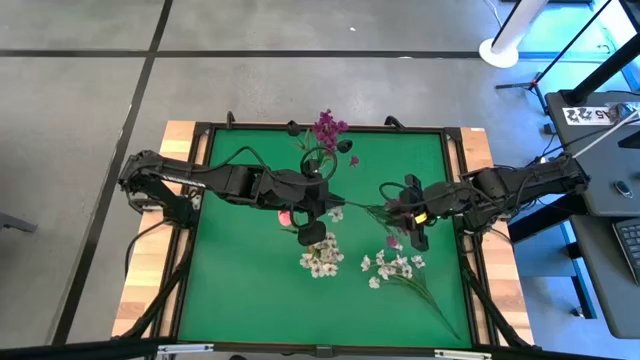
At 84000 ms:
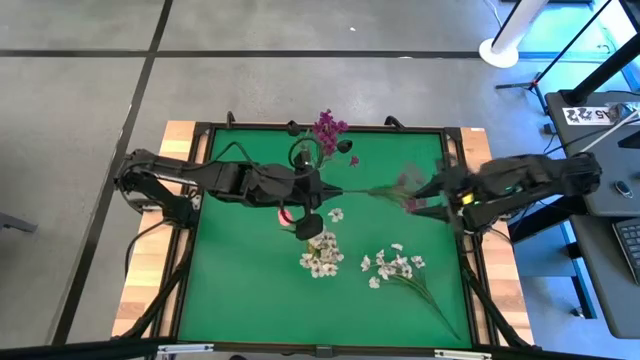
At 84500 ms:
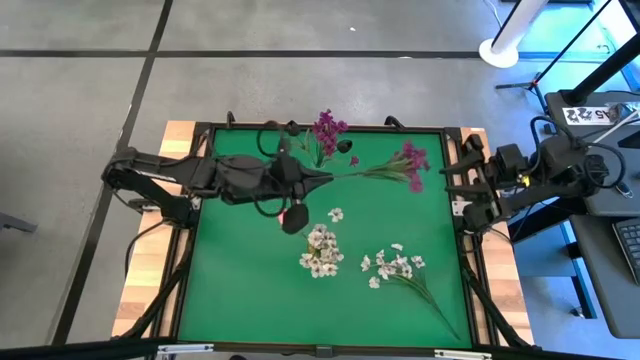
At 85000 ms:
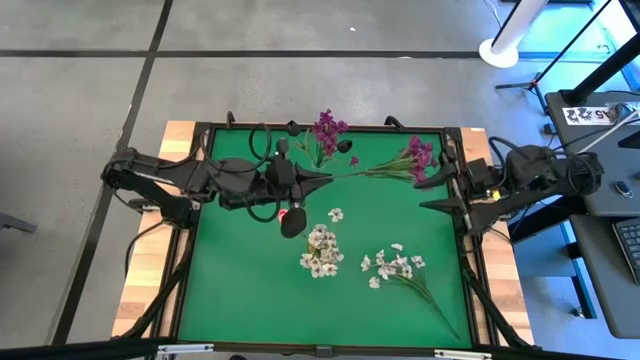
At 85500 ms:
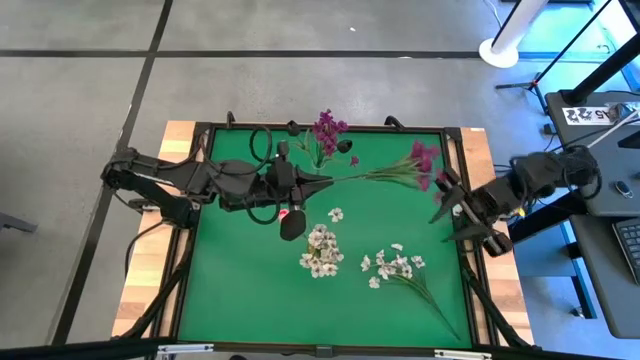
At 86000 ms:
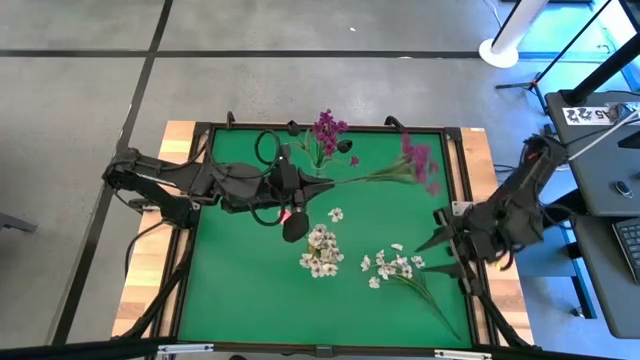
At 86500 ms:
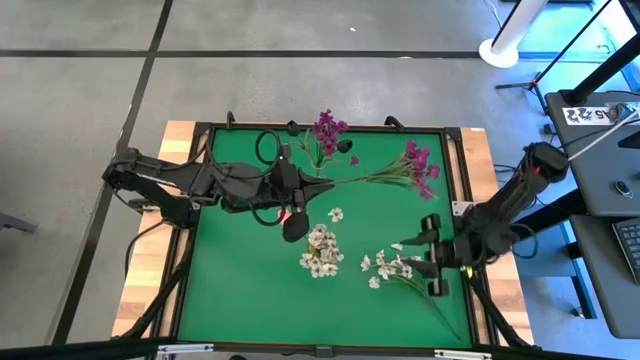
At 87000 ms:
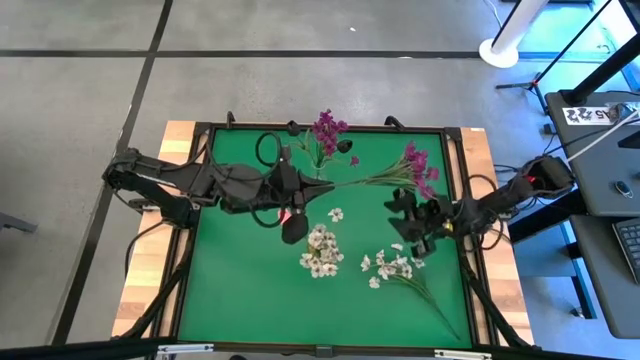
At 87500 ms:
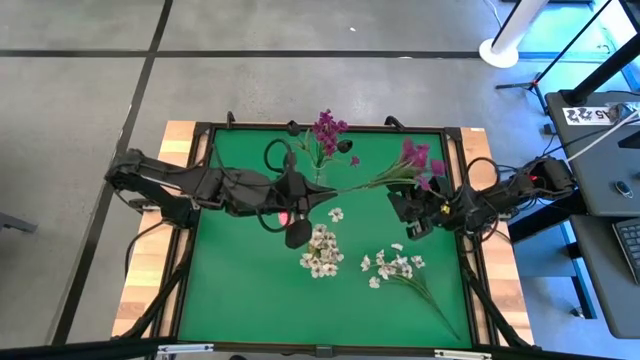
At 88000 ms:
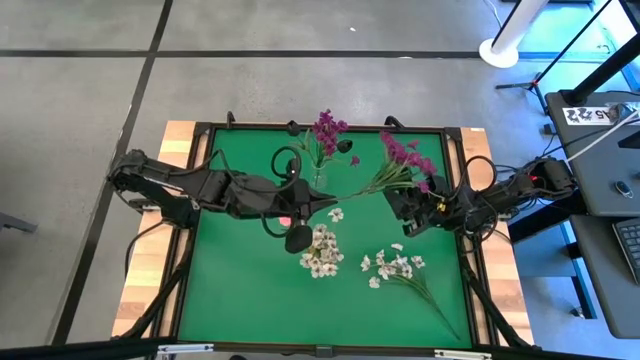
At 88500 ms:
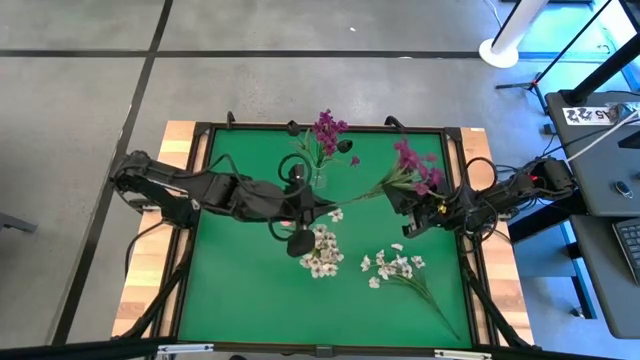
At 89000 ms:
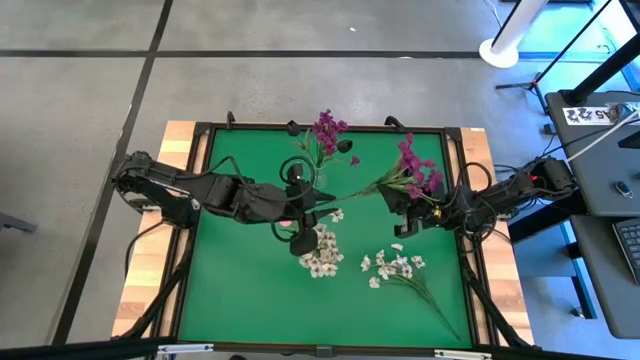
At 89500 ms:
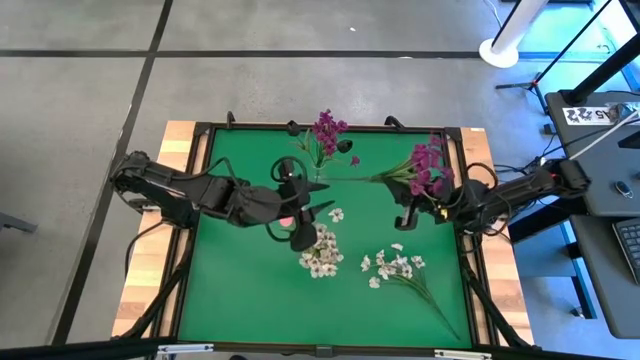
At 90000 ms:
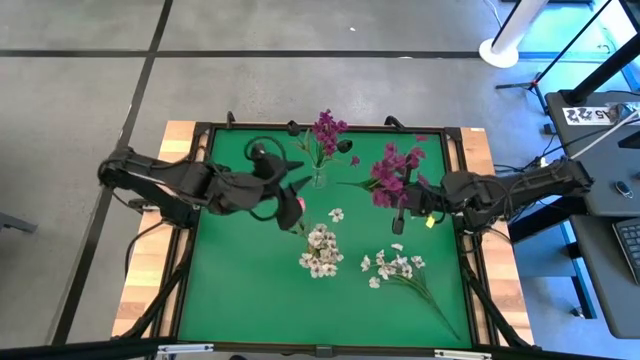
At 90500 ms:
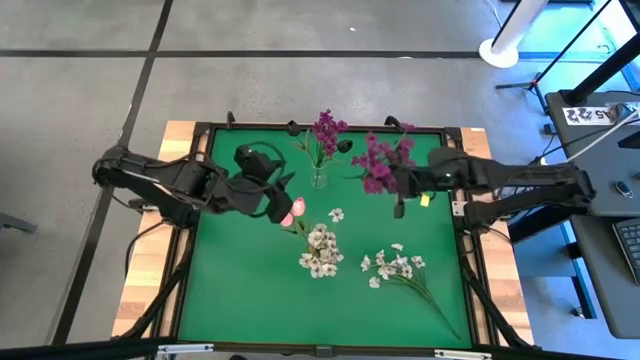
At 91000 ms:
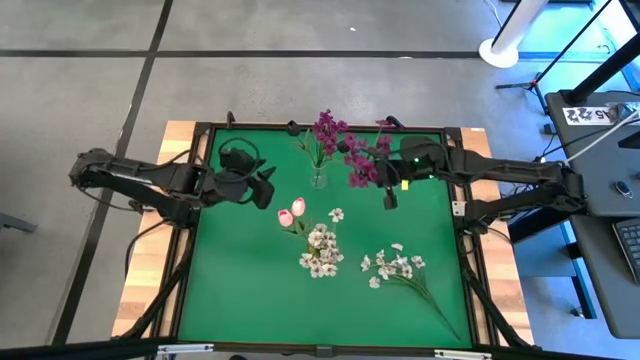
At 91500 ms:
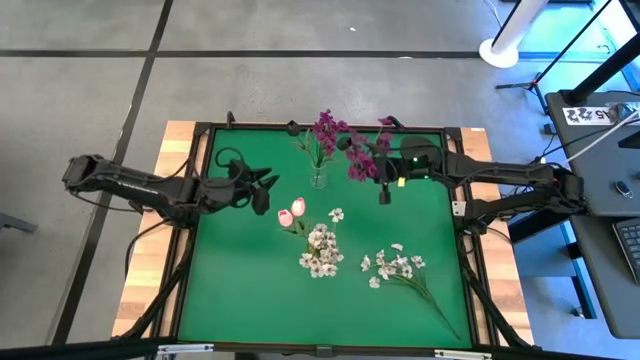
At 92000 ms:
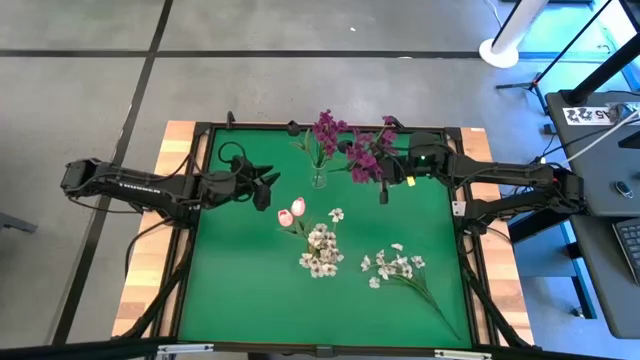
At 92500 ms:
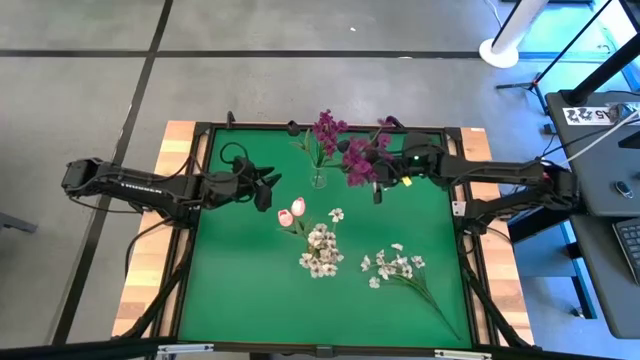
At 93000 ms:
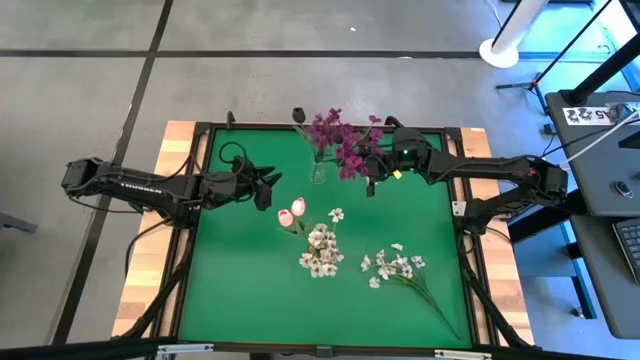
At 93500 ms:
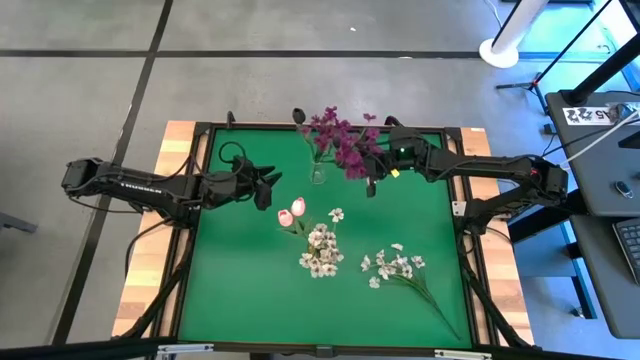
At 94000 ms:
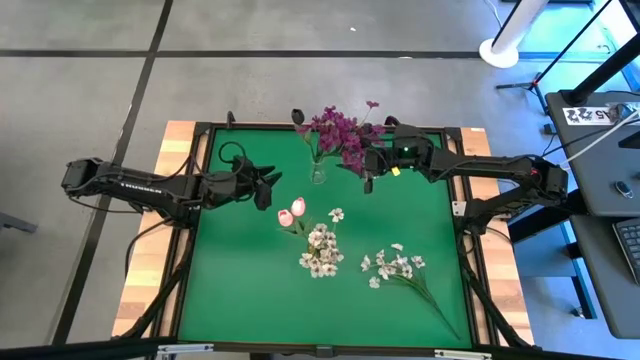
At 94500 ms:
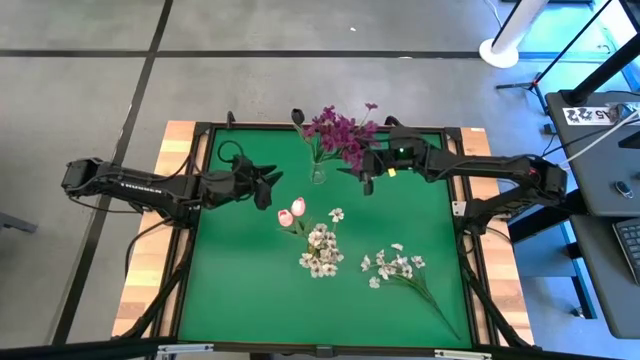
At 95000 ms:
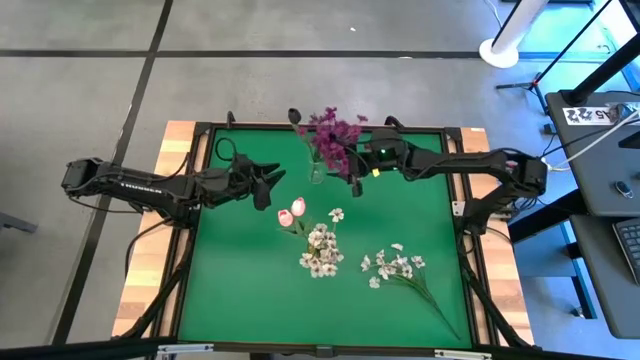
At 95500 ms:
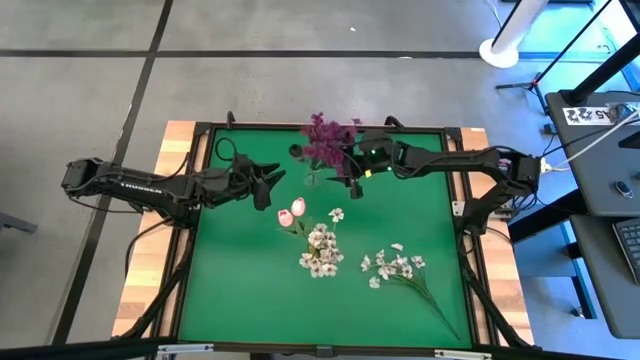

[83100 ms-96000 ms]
Task: Sort flowers into vase by color
Put the purple flower into the transparent vase

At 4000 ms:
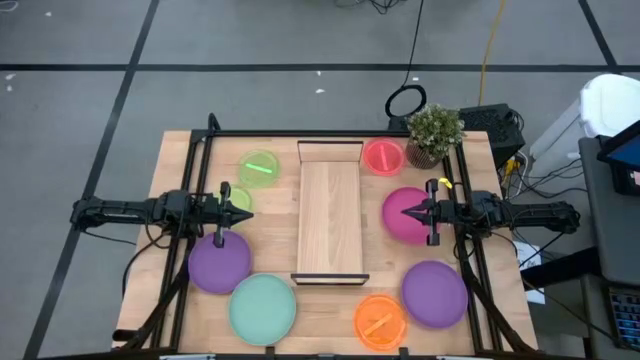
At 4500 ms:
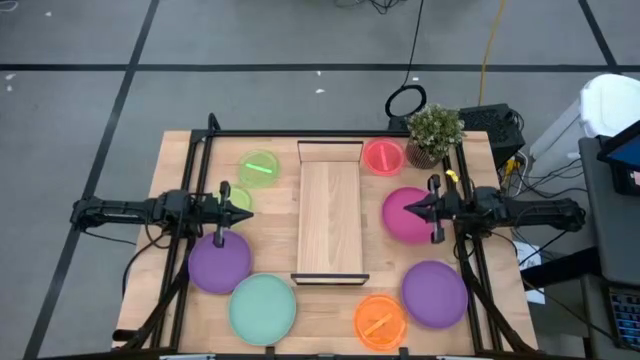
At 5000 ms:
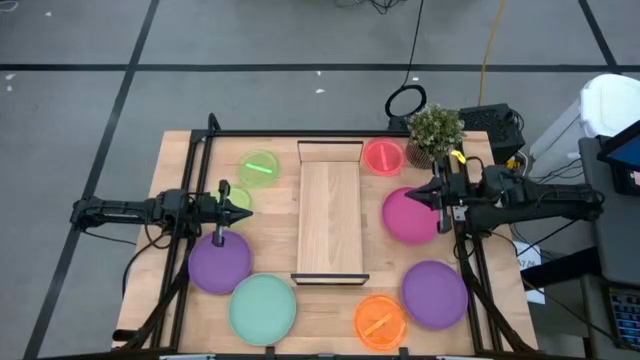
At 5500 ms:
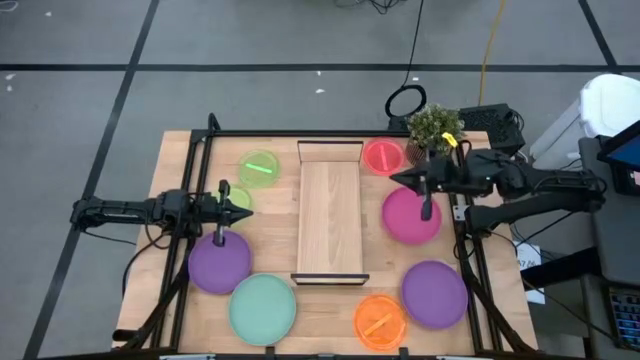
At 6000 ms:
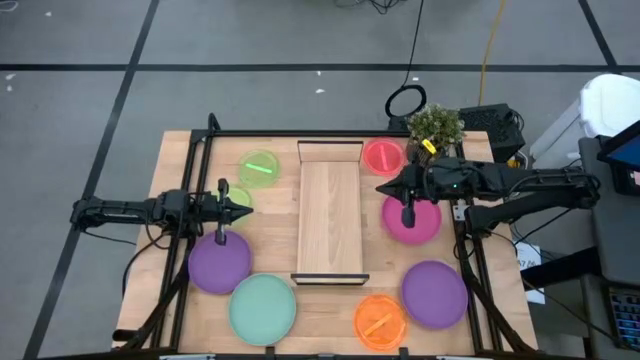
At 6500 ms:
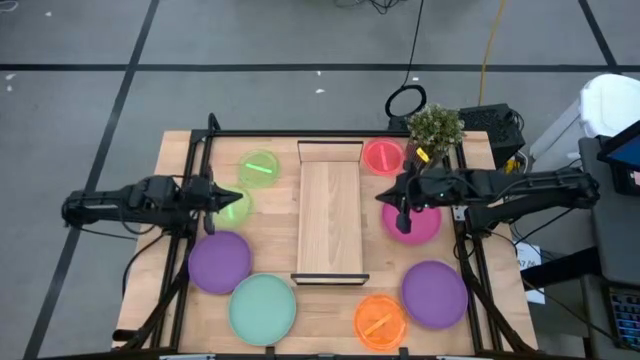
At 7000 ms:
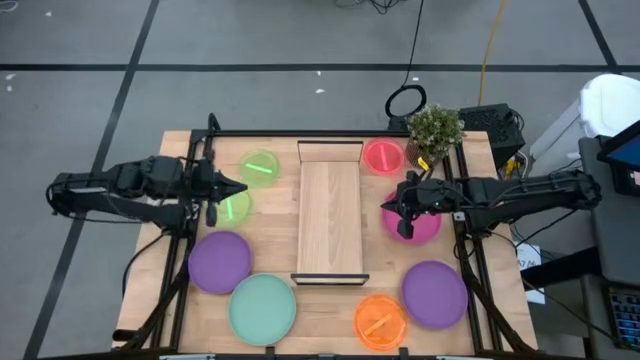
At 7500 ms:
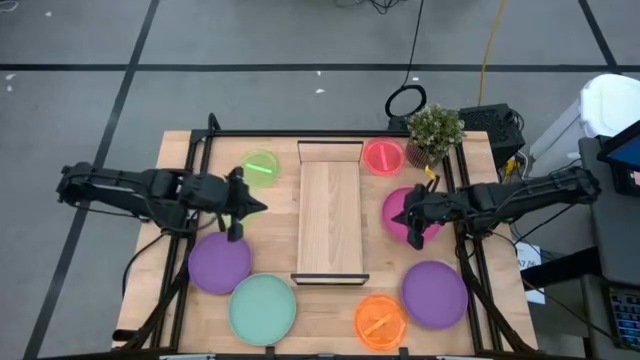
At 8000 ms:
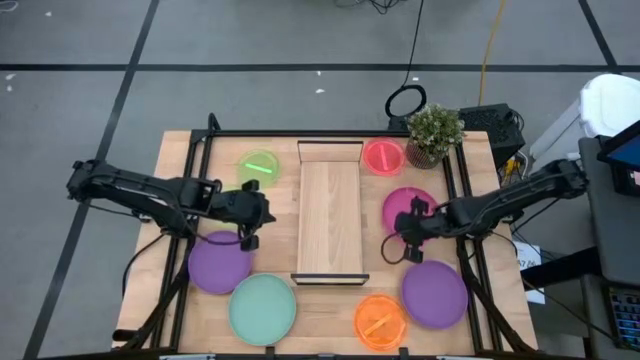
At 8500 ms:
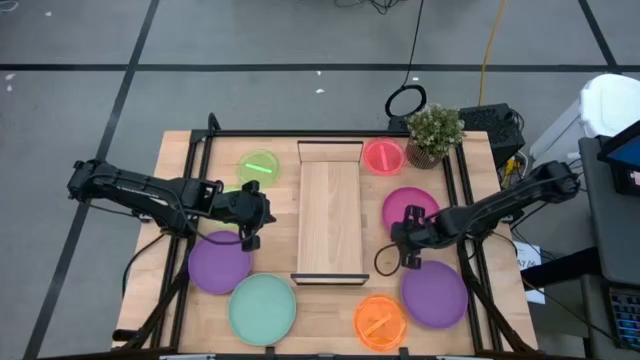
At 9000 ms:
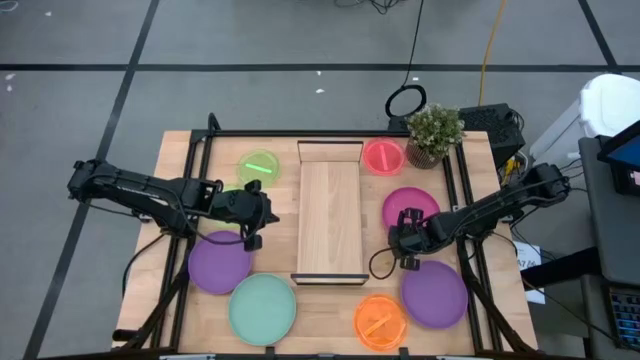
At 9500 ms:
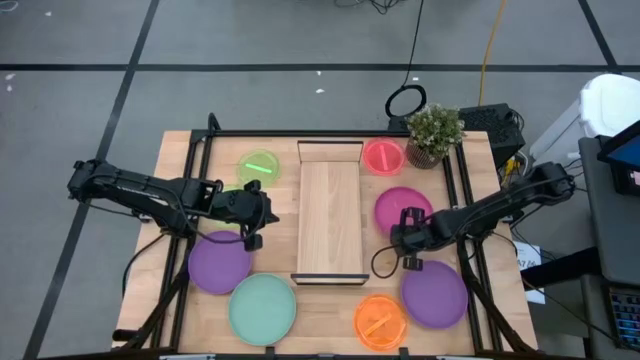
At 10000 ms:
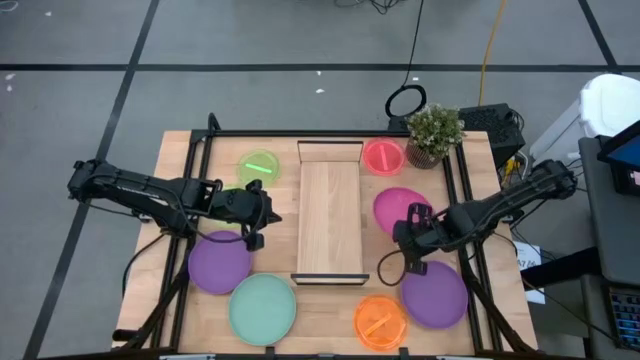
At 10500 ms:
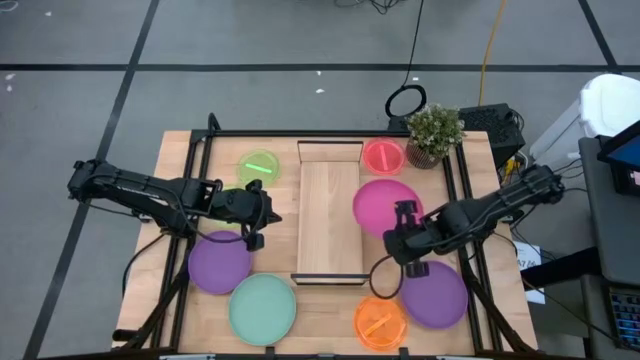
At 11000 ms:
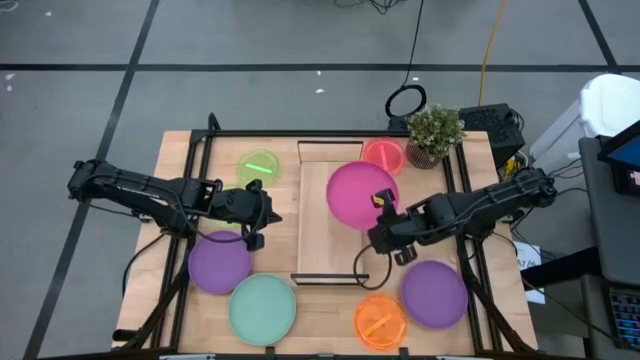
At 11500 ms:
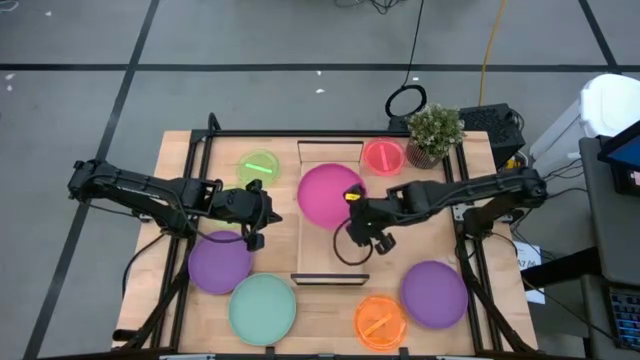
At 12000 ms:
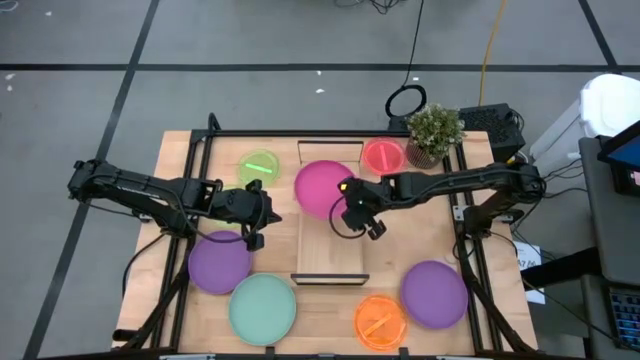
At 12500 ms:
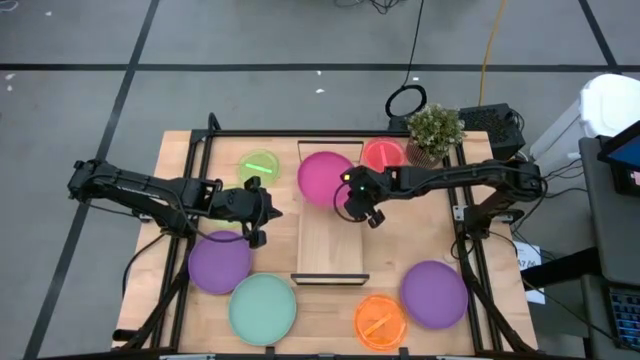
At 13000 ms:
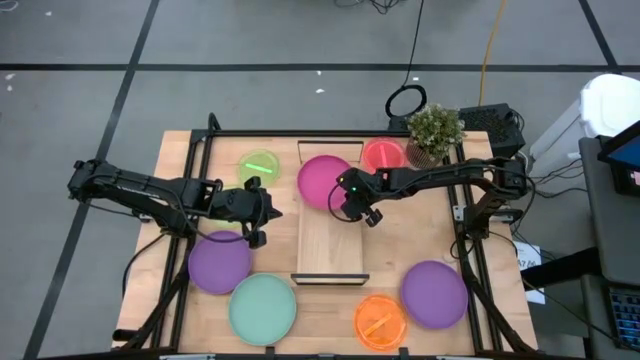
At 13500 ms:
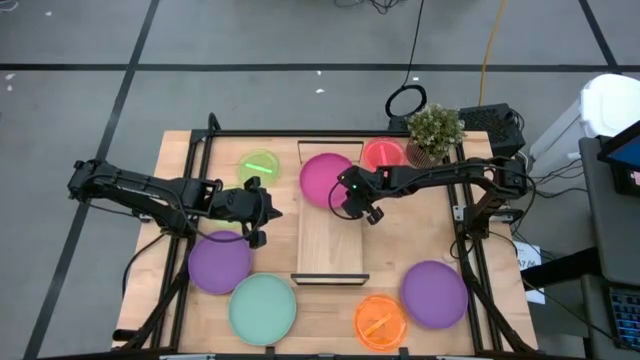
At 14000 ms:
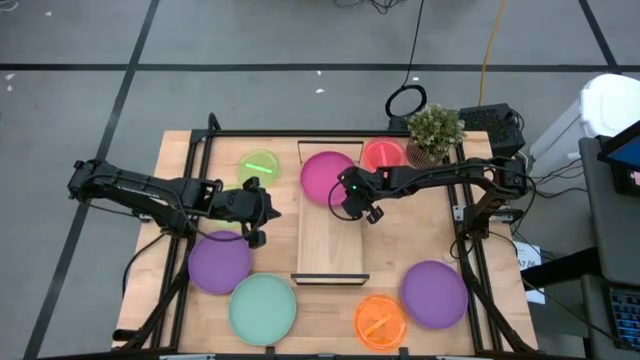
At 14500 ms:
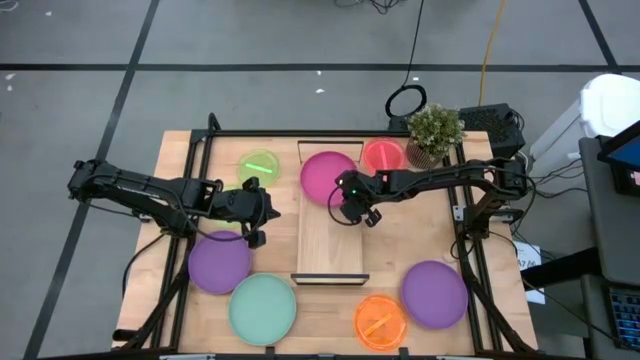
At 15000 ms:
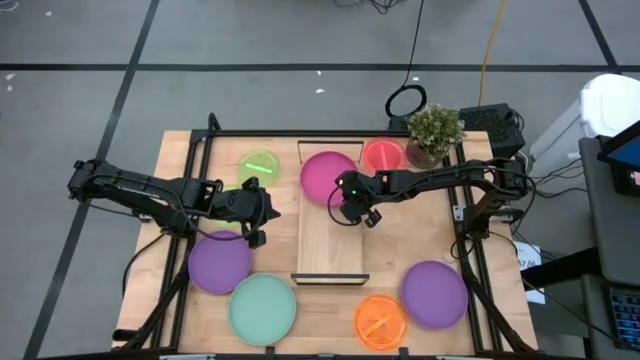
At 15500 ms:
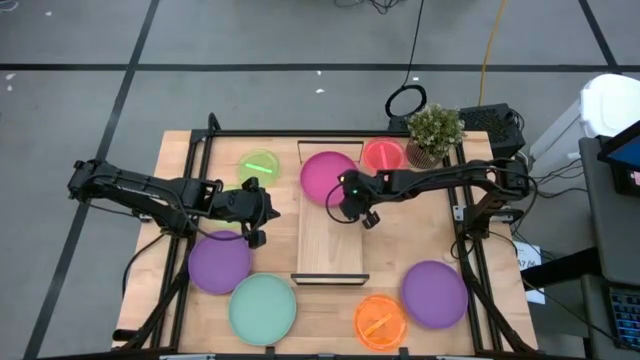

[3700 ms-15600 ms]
Task: Place and stack plates onto a shelf
Put the pink plate on the shelf
